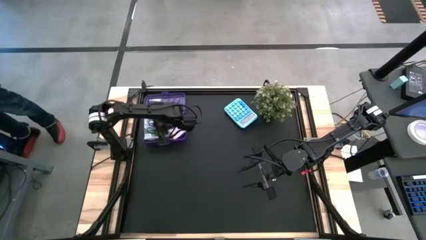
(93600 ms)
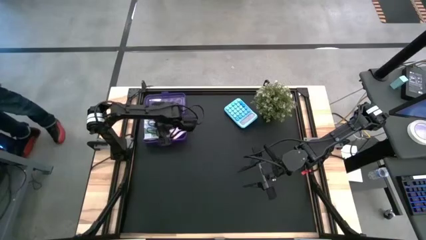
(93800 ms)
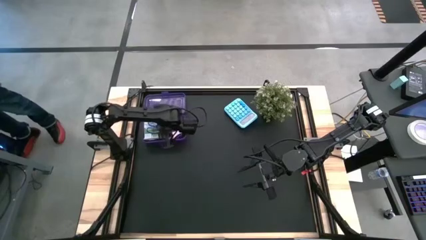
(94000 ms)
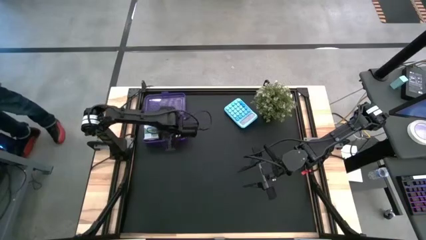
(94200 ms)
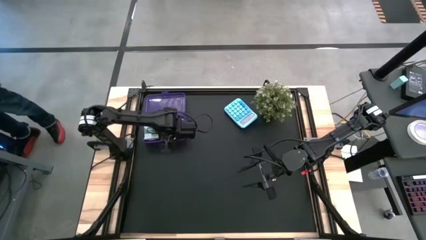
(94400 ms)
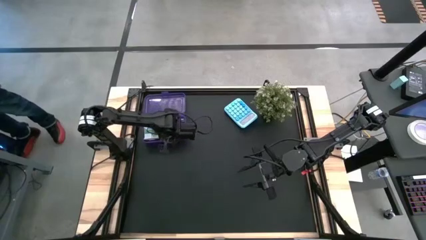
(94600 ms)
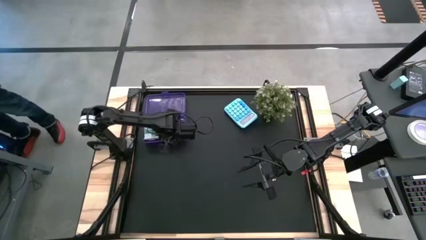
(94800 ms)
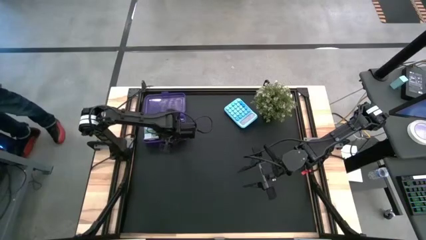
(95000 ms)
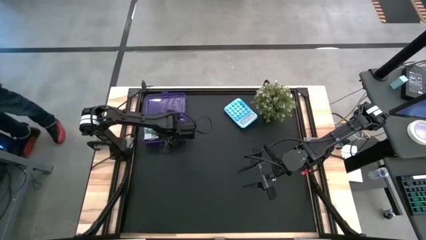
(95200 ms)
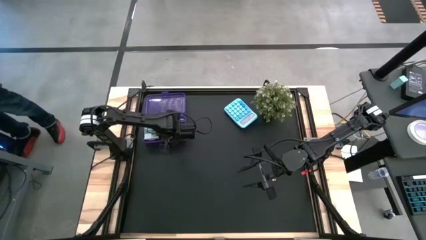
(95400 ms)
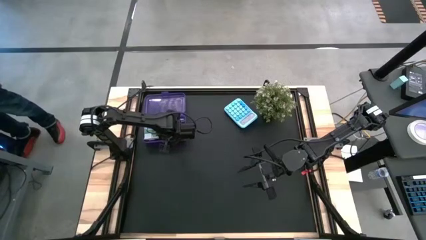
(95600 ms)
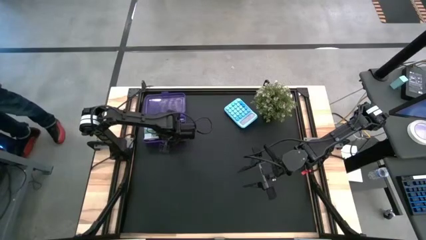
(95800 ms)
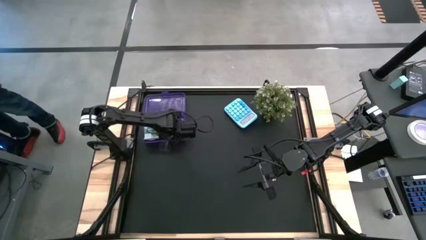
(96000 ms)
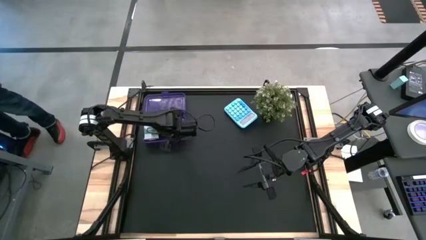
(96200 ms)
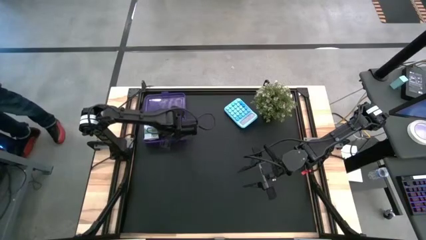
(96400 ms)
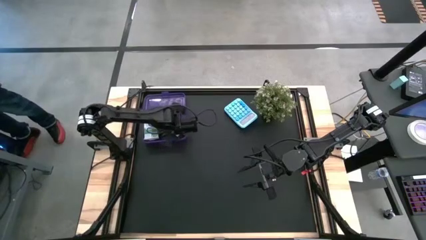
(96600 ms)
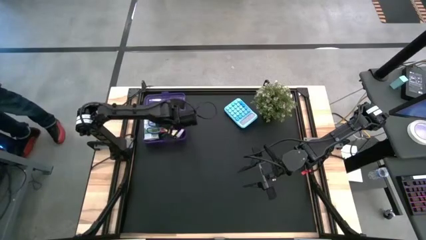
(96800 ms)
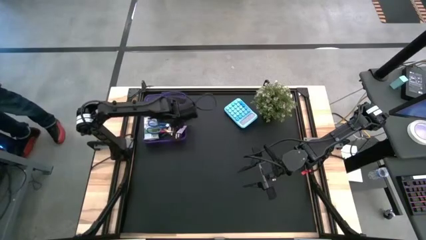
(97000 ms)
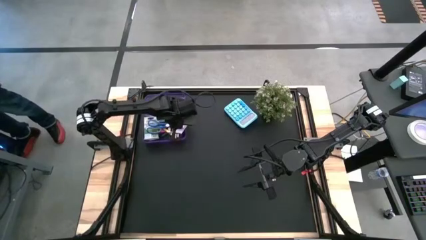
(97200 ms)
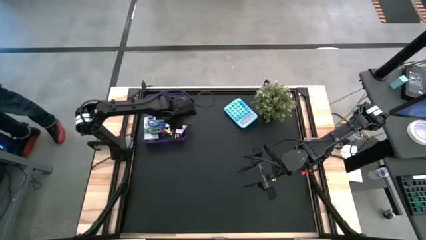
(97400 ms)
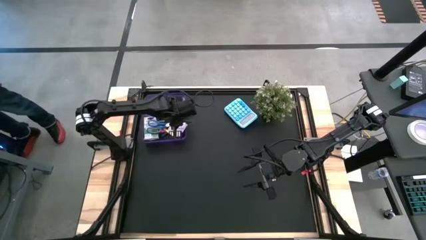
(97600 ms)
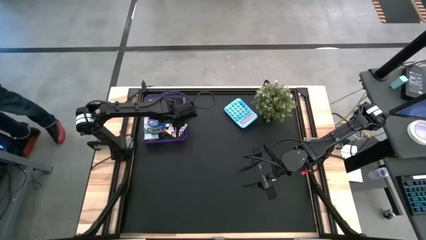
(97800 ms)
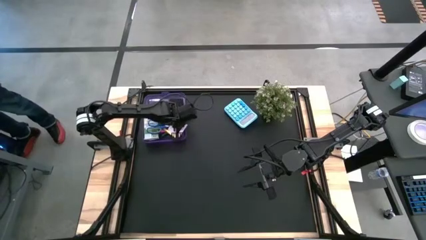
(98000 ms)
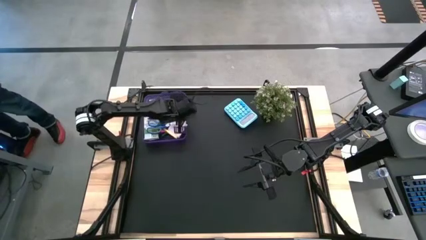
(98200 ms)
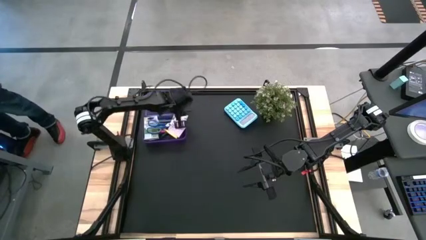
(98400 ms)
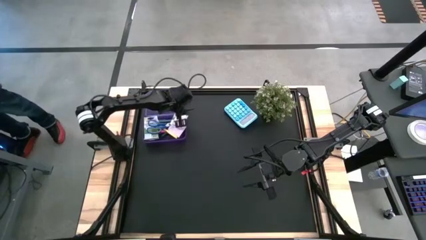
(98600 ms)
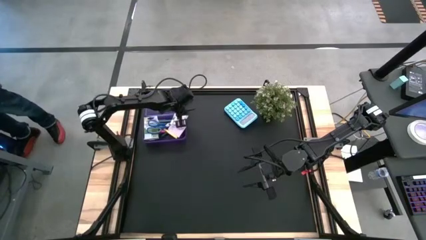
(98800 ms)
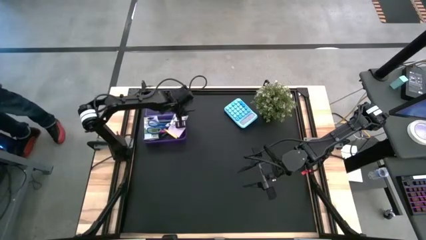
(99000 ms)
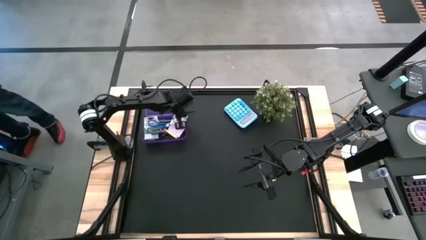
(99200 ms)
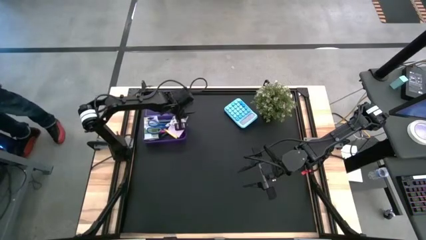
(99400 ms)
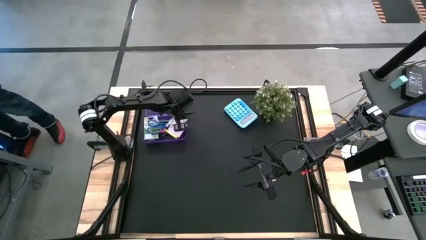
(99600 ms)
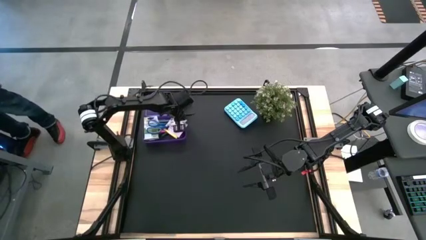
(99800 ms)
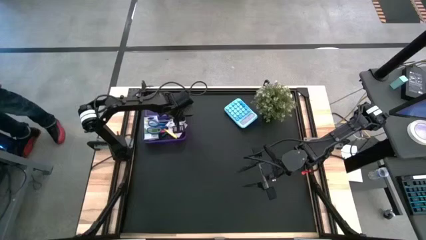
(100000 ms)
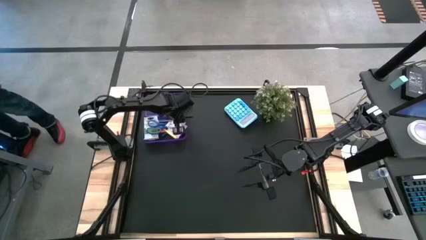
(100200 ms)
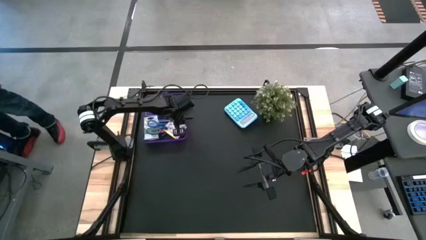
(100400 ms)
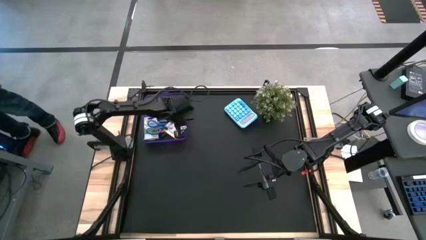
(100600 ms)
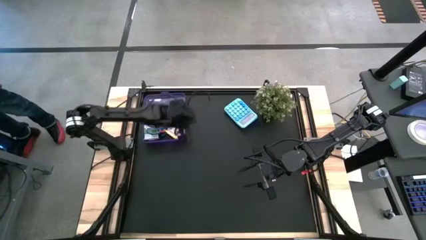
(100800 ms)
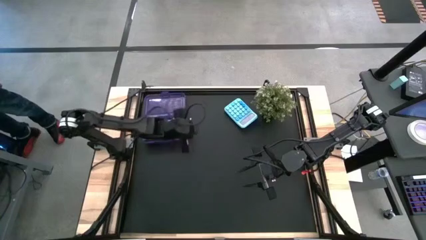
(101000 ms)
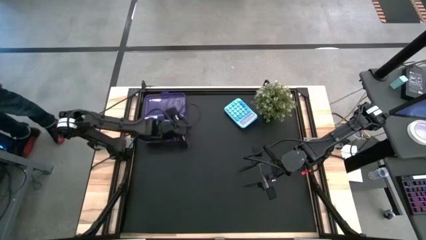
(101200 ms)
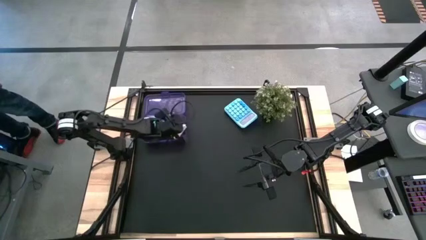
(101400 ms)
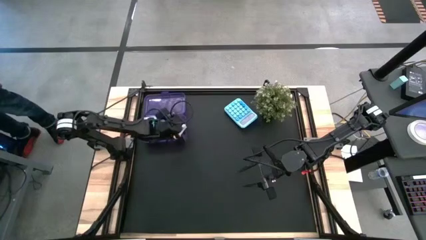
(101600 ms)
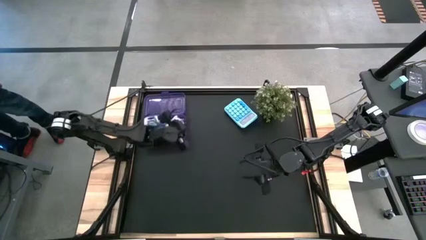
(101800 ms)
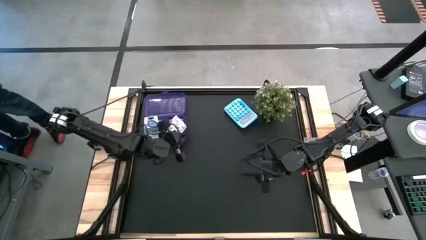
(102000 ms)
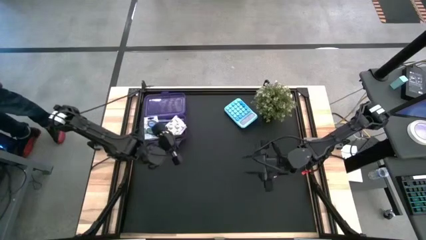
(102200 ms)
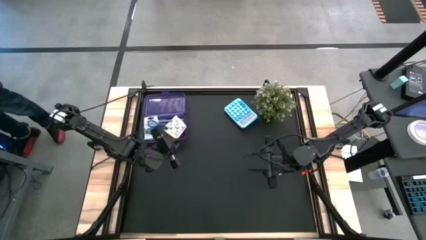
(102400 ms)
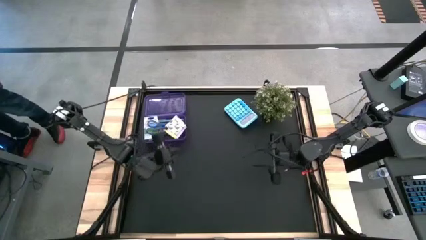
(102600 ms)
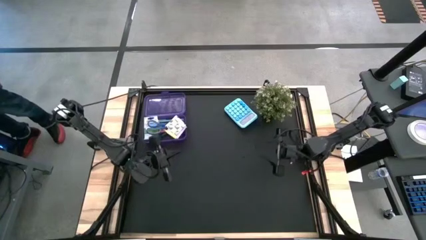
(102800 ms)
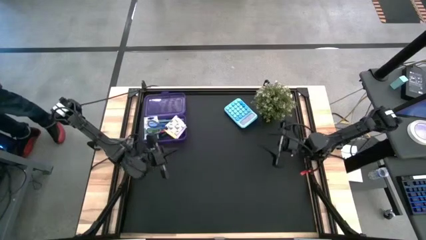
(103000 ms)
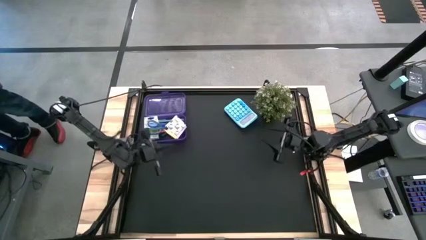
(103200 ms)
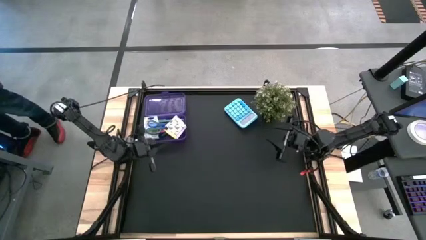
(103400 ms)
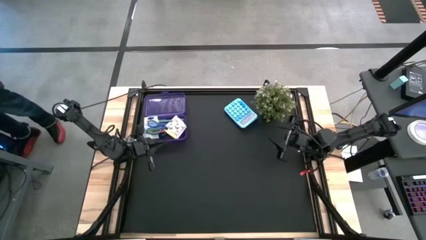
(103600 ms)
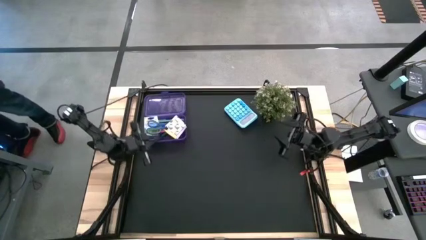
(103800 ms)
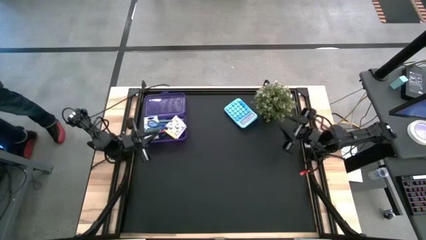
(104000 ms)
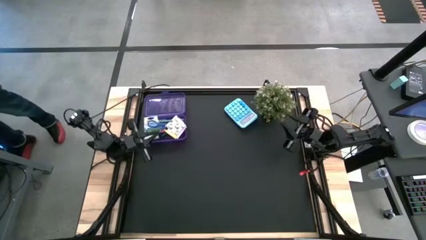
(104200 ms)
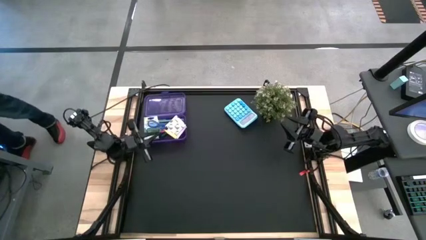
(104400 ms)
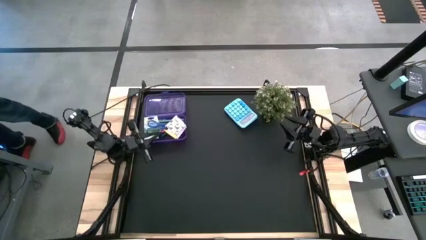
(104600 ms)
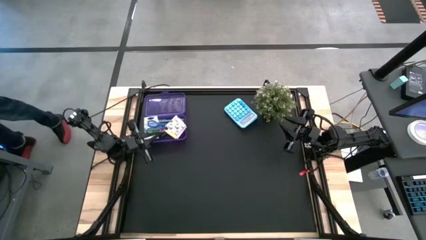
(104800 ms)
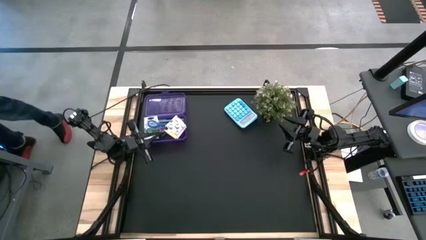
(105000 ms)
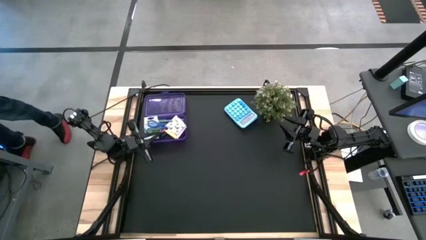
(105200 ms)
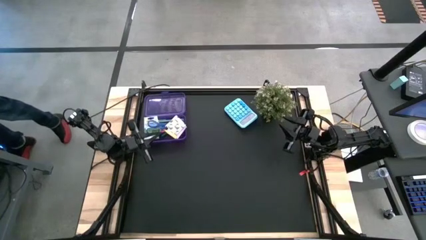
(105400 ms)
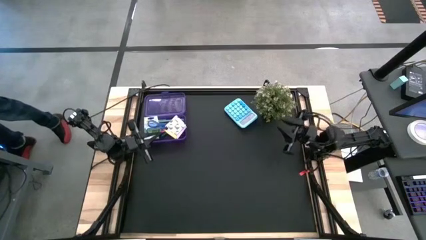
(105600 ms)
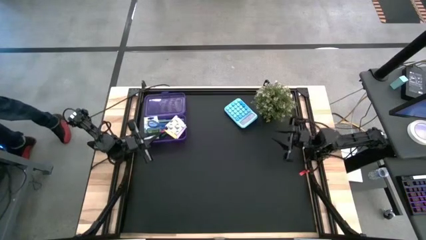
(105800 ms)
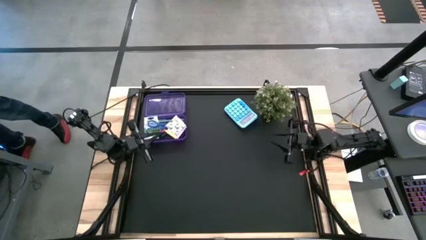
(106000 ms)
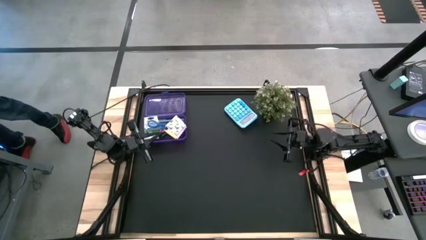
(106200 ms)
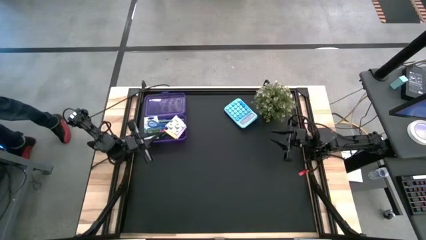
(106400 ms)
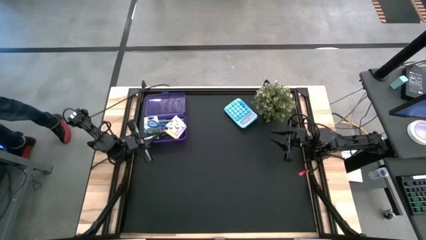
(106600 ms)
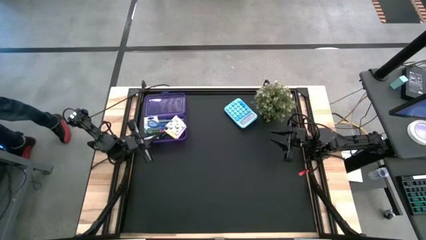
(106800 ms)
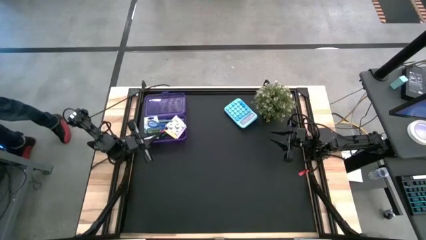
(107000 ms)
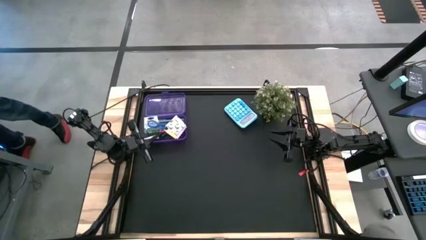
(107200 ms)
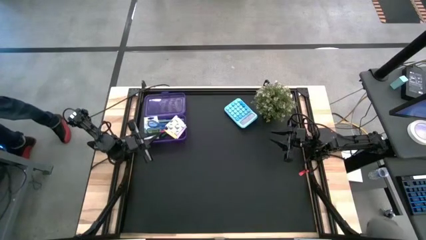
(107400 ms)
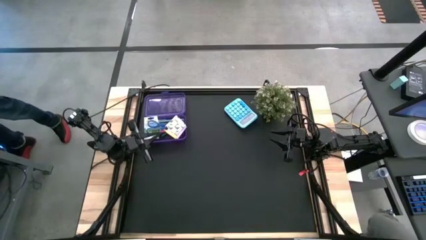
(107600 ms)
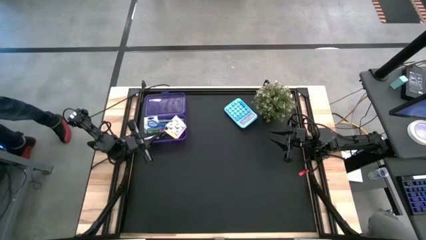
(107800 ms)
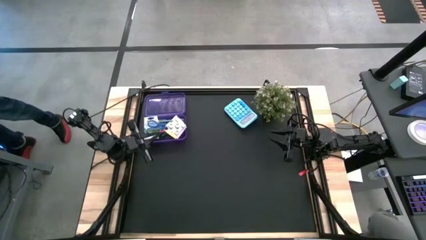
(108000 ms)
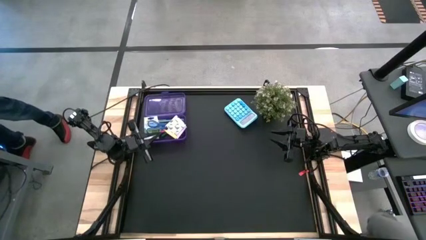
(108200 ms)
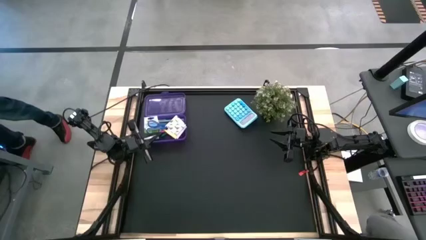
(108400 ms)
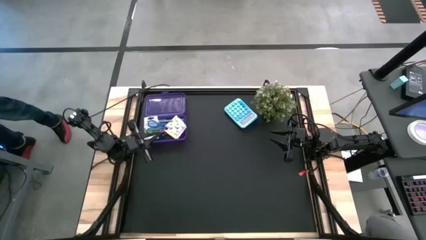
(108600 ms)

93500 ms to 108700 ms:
Task: Pack school essentials
Return to Home Position

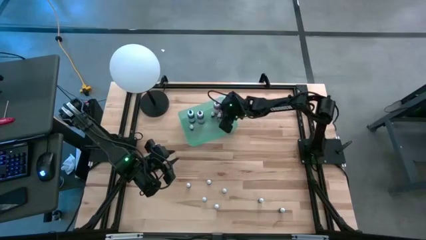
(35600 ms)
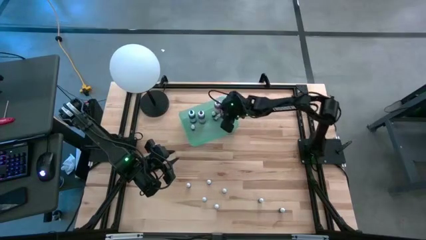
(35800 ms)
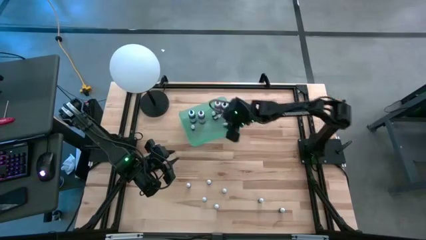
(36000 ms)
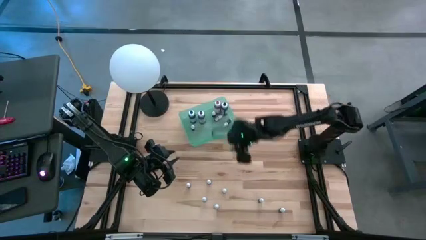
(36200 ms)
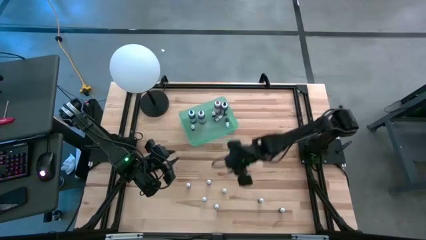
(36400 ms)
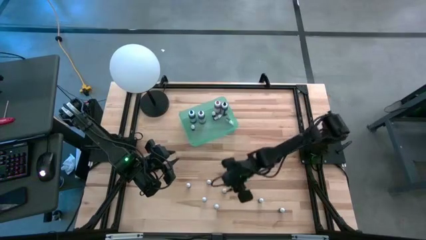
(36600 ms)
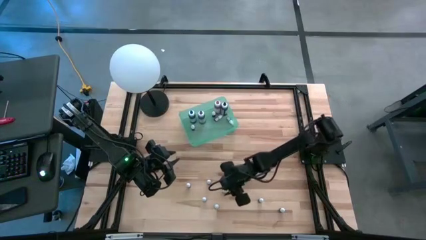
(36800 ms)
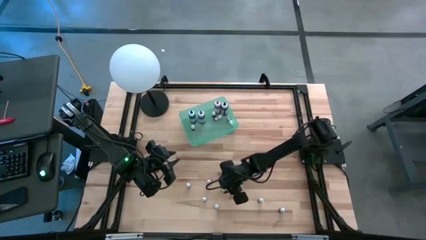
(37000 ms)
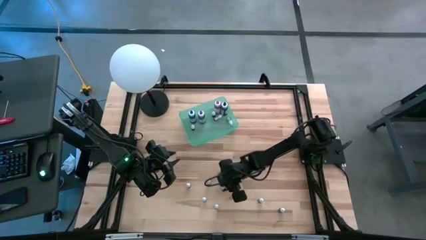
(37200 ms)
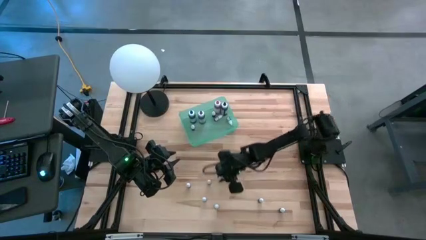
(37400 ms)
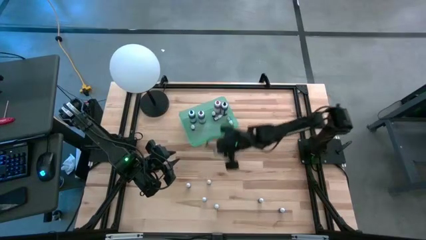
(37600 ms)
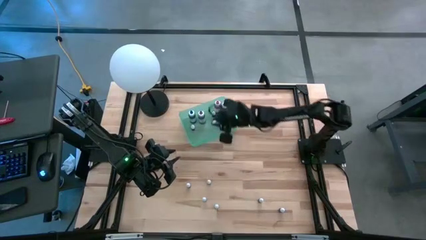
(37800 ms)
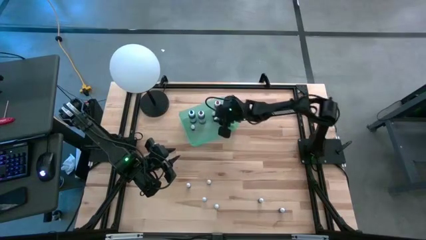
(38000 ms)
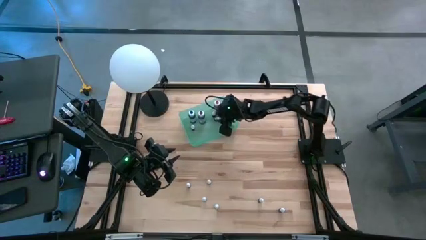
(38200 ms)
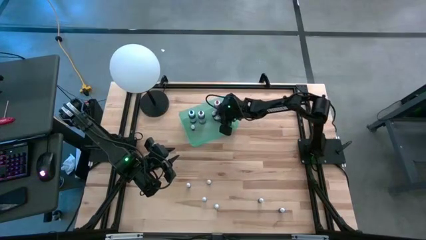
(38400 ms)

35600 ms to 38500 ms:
Task: Pick & Place food coloring
Put the bottom small light green bottle into the blue bin
